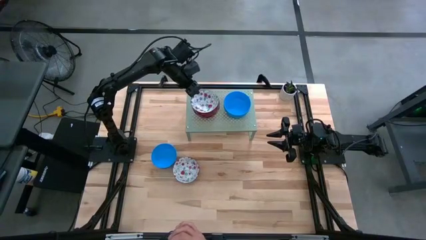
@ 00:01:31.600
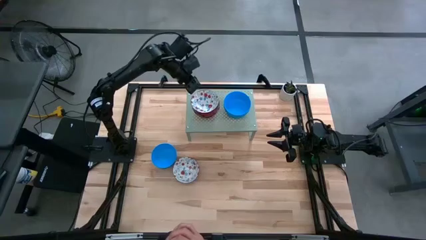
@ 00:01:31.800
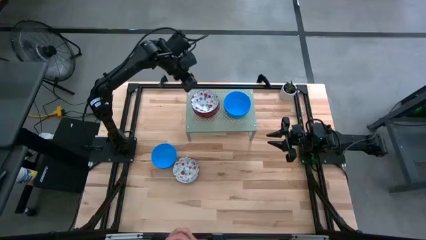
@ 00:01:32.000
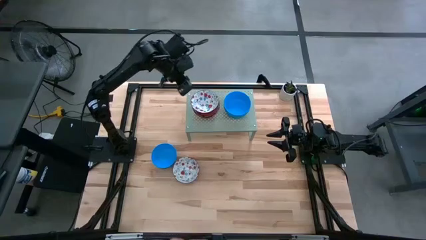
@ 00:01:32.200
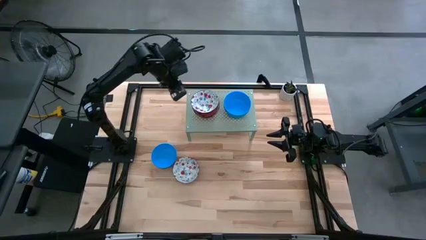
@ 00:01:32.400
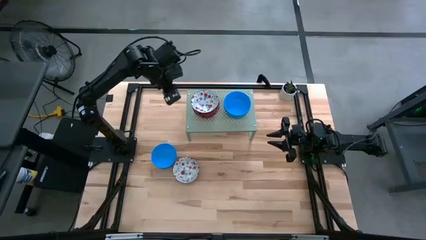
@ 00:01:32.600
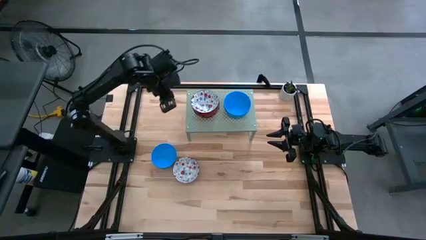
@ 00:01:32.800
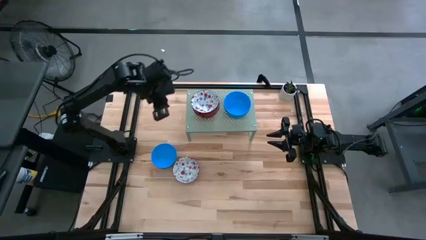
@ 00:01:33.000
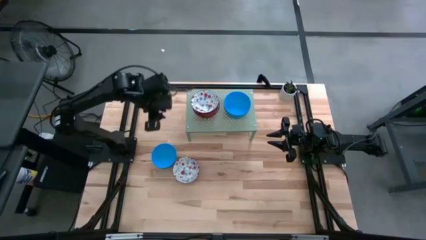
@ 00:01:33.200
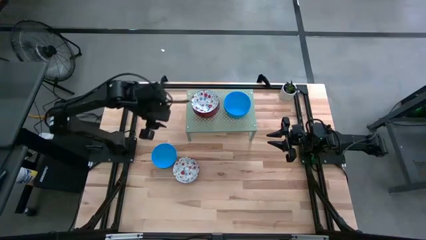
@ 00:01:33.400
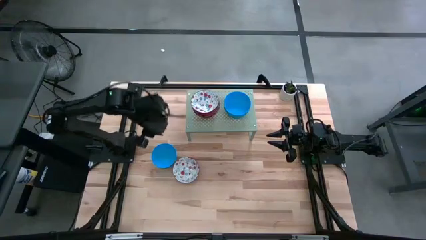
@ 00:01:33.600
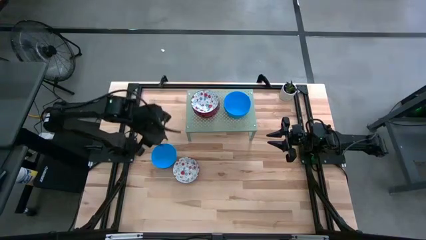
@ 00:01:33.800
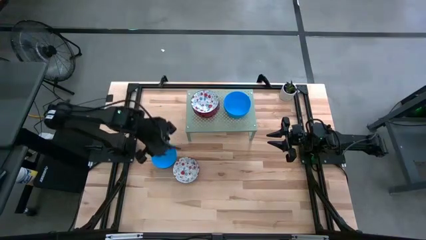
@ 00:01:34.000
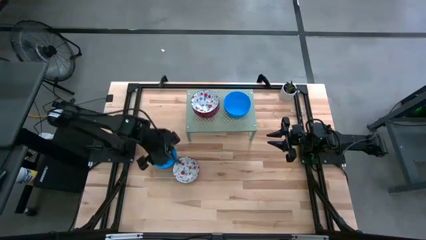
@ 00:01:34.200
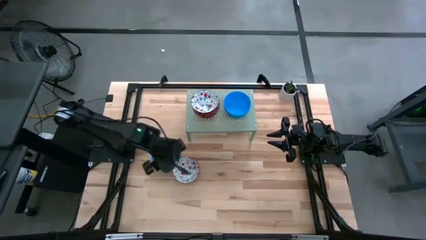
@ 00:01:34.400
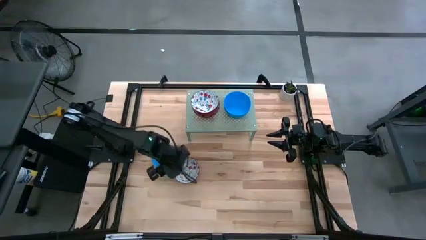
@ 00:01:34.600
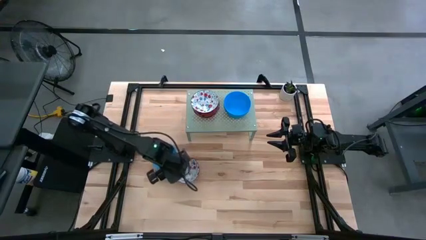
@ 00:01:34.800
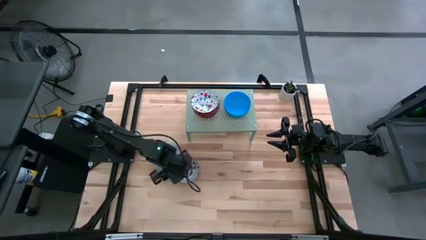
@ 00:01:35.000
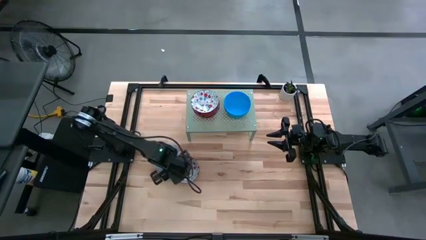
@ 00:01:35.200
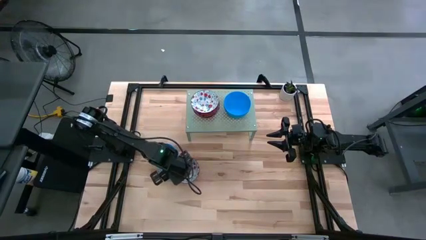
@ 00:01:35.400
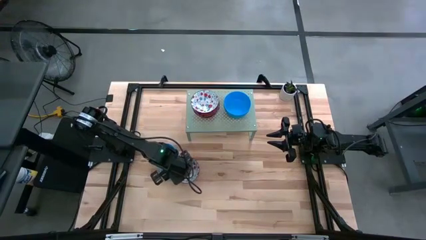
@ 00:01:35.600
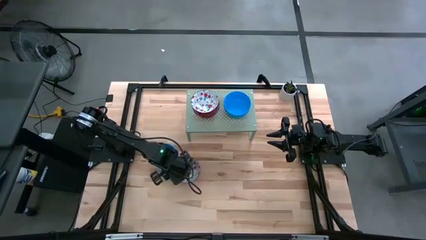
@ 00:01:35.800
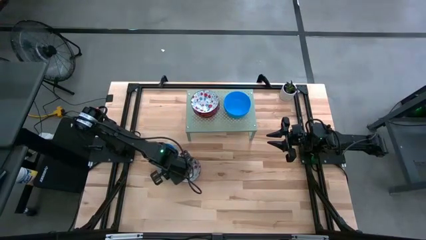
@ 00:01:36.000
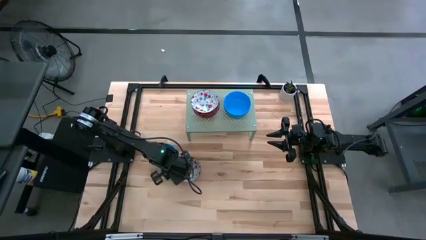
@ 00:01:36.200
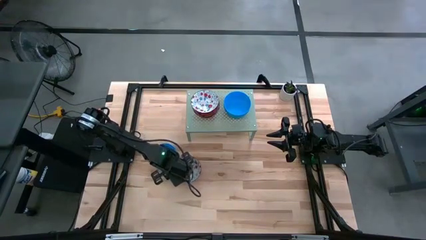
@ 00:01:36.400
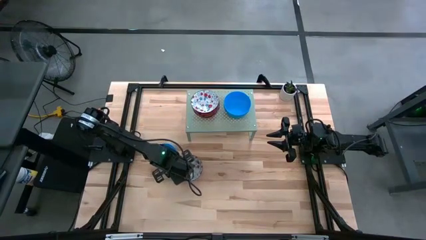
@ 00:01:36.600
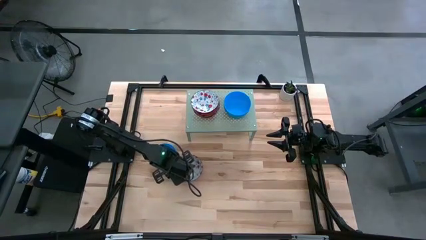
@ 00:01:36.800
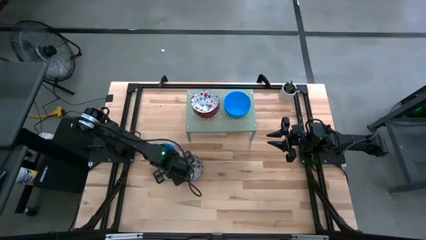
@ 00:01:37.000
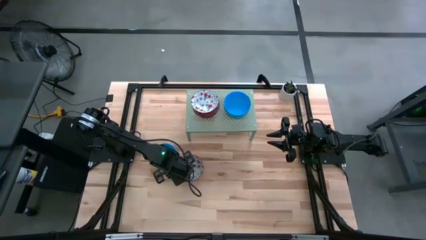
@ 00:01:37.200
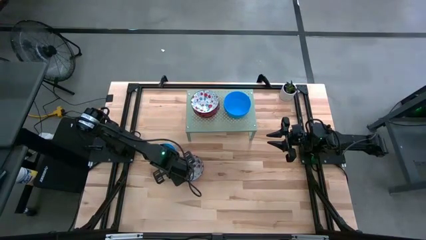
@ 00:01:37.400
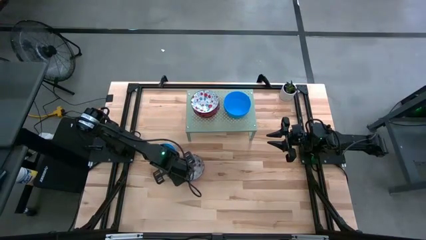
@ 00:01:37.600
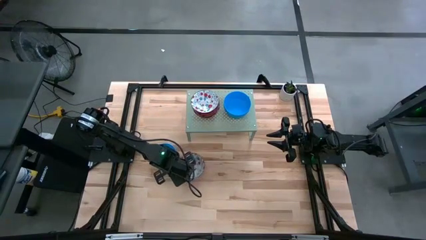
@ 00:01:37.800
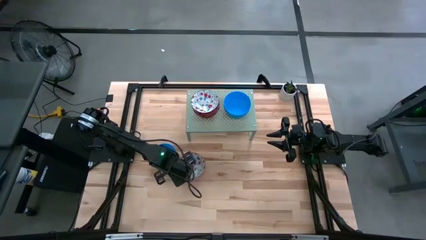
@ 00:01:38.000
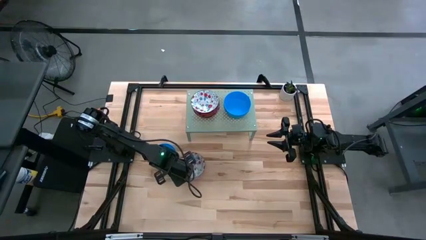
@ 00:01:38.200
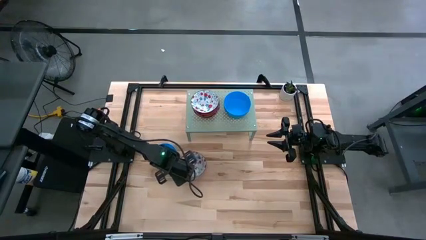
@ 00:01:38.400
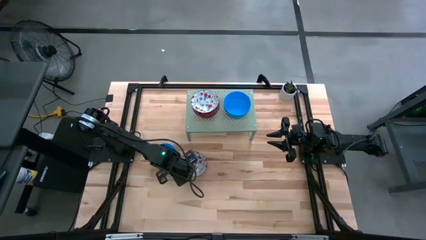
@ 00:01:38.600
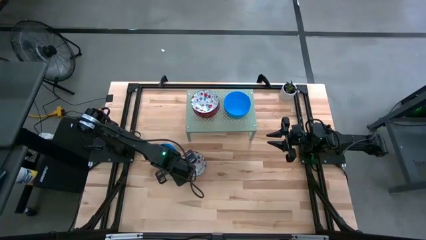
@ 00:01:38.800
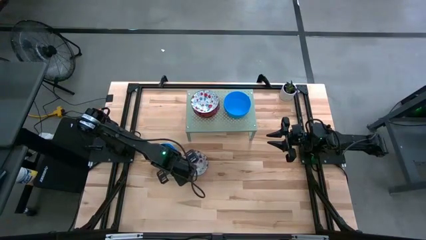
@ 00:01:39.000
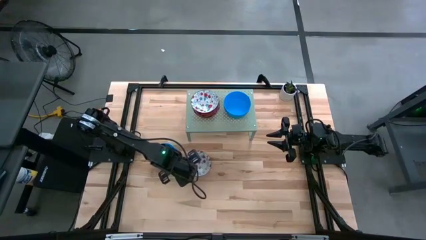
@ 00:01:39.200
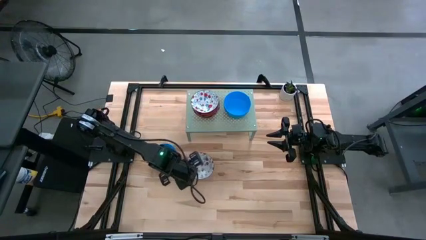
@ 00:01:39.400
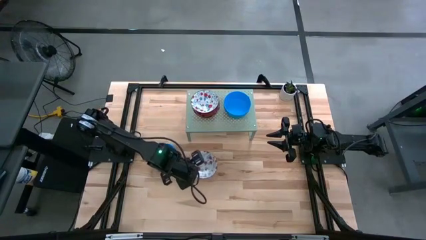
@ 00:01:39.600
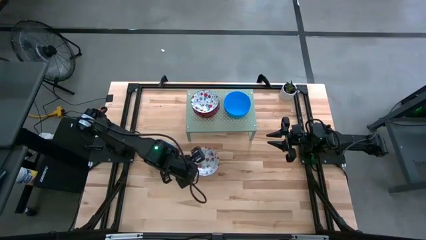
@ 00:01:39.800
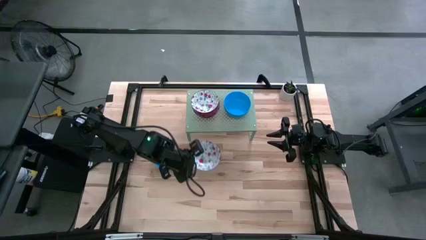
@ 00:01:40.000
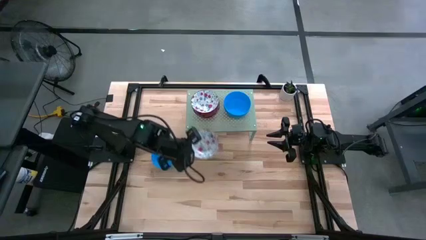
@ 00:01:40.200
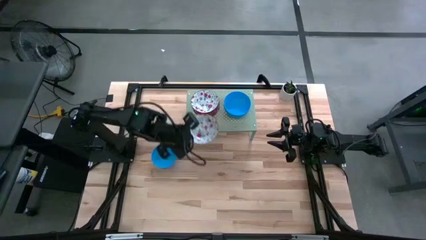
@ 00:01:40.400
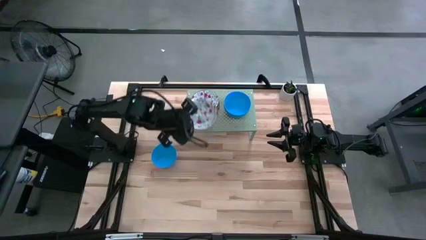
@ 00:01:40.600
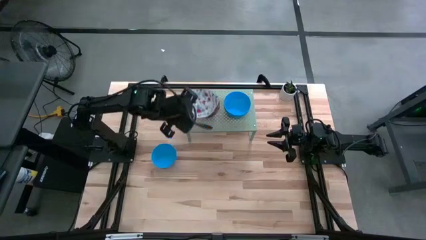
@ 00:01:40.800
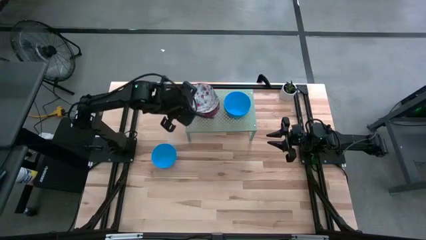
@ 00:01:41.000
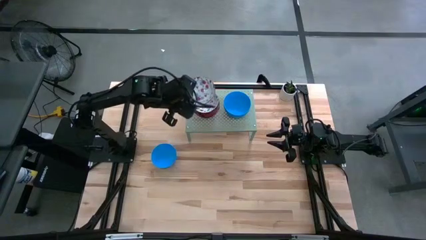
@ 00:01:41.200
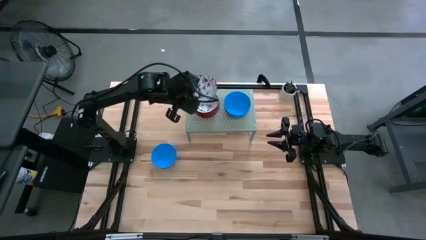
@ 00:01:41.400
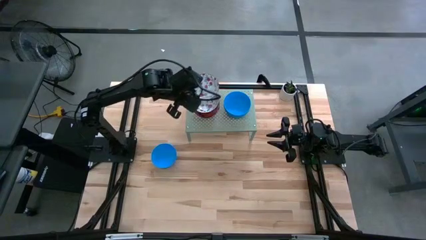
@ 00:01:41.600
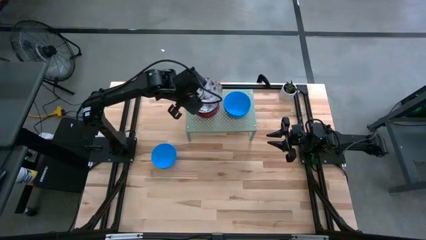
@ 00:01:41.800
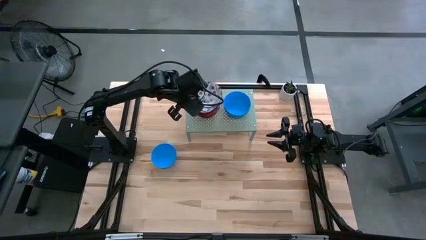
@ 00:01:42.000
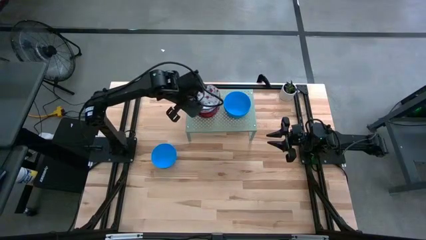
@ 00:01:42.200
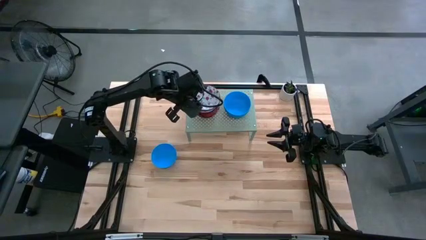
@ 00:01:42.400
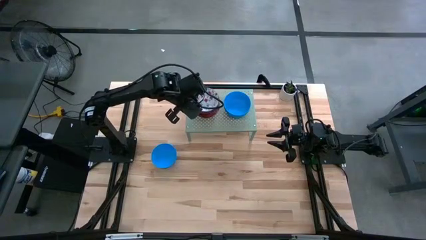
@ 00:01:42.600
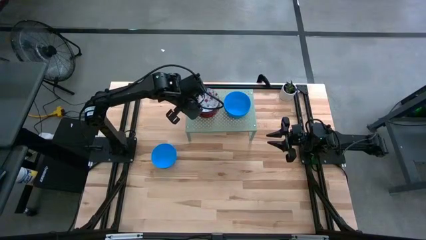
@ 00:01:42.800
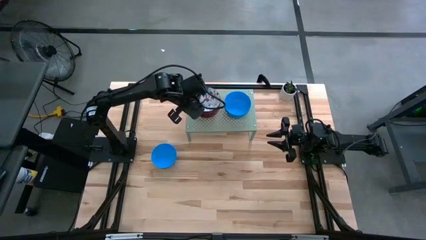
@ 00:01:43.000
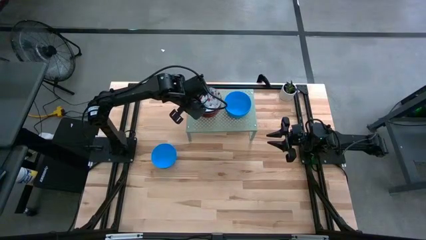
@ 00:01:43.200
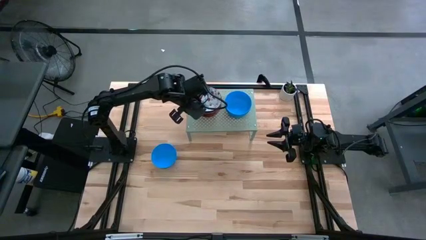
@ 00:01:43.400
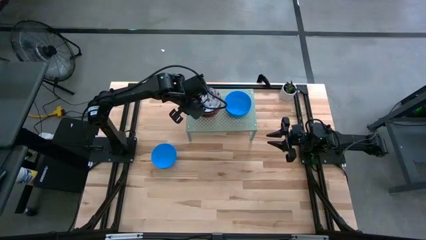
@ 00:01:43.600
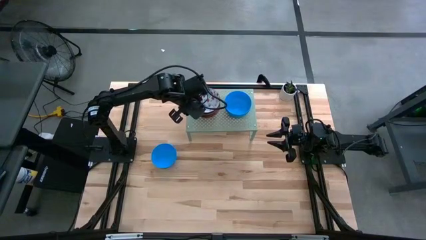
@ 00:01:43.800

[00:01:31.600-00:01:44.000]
Task: Pick & Place Mini bowls
Stack the red patterned bowl on the stacked red patterned bowl on the shelf

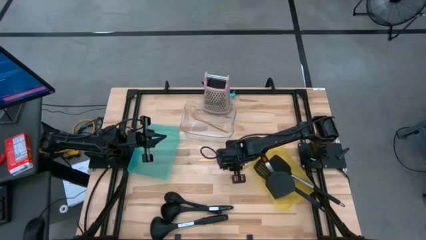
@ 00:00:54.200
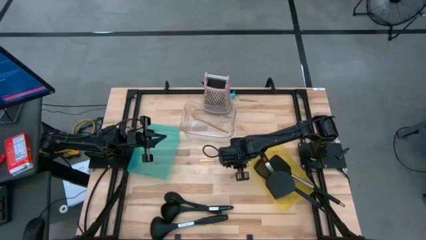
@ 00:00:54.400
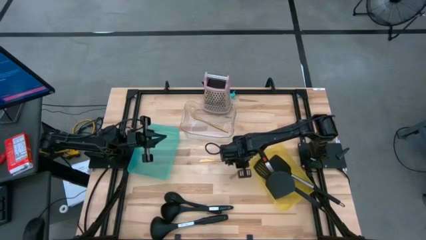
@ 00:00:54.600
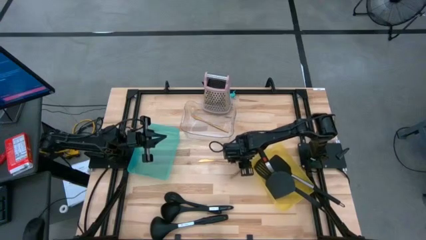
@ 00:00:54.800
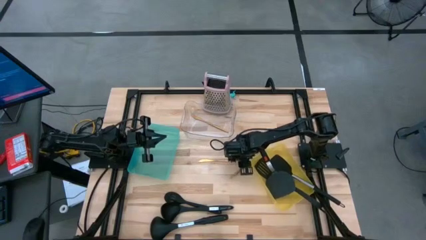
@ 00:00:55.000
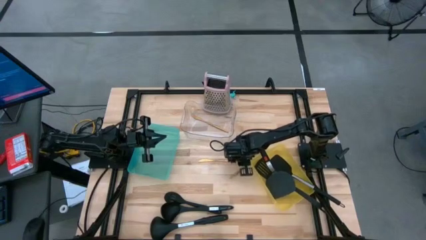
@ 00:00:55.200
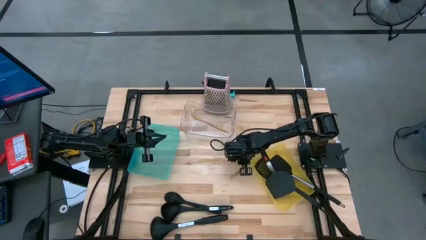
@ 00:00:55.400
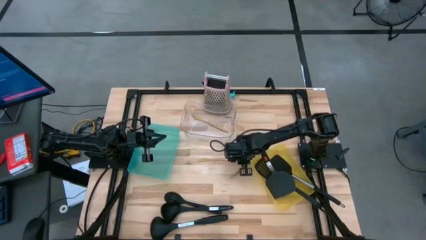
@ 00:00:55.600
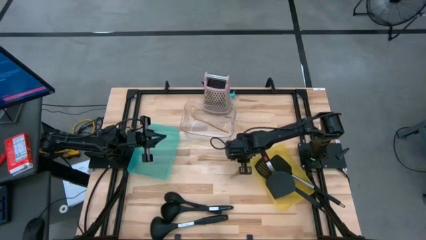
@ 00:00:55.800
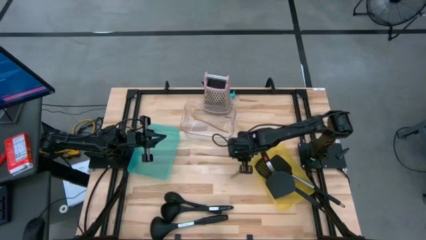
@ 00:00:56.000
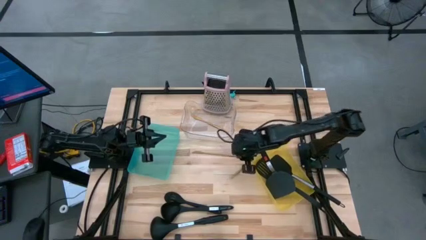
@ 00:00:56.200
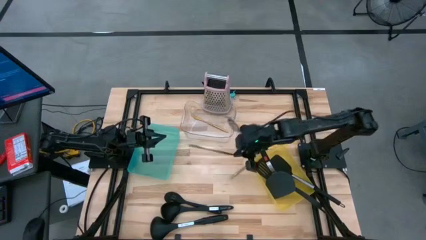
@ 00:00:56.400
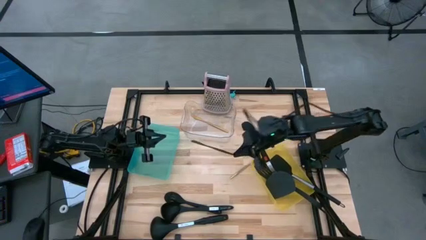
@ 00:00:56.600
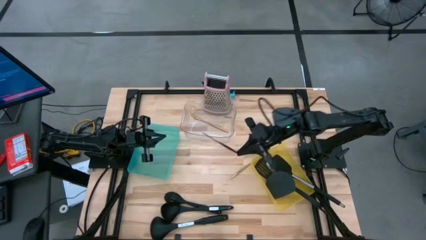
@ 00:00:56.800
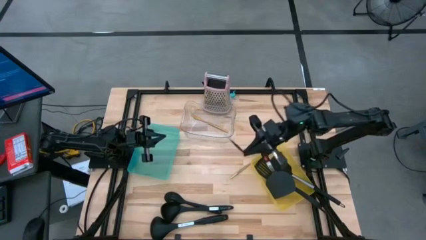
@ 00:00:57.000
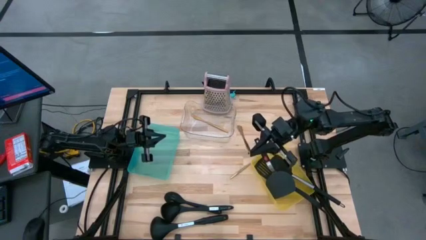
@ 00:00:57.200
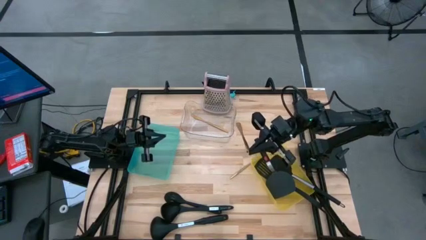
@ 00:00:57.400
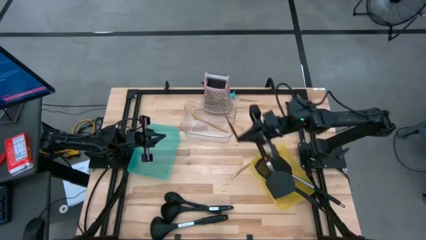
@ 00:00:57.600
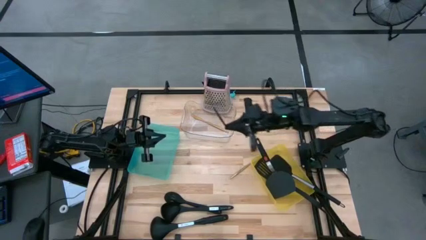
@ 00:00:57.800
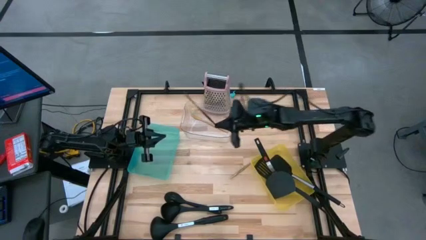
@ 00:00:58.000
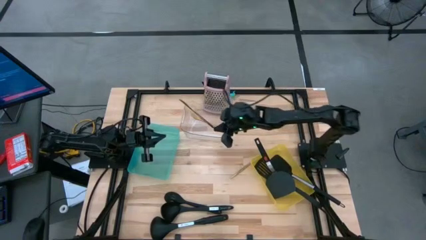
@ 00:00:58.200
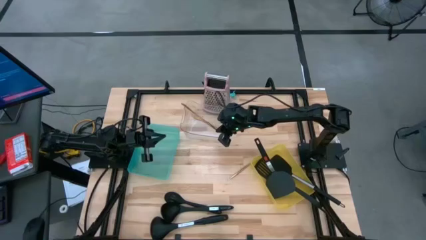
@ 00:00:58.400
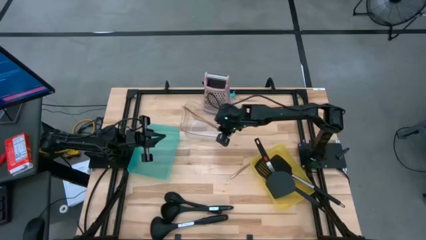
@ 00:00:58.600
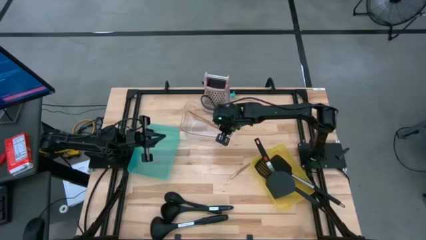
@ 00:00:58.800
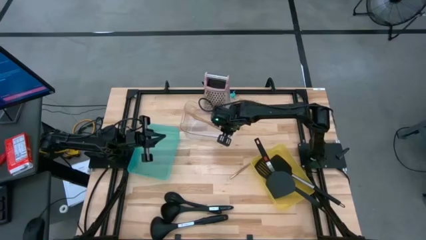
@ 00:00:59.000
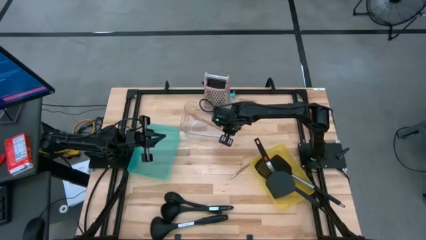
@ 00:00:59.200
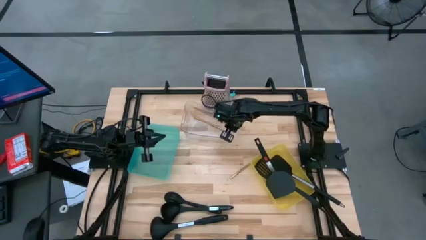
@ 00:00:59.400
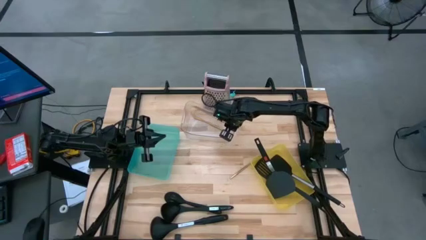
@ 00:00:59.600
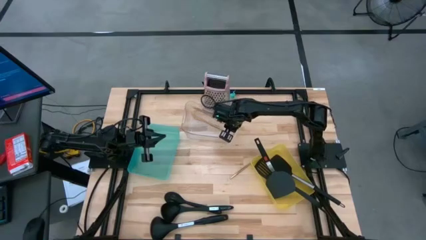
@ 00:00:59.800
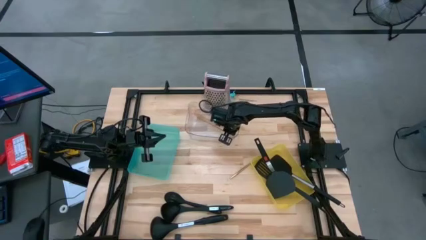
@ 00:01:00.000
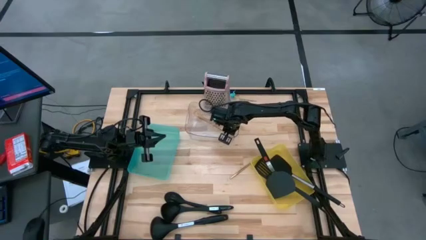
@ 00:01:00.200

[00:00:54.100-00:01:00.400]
Task: Pick & Place Kitchen Items
Put the gold knife into the transparent bin
